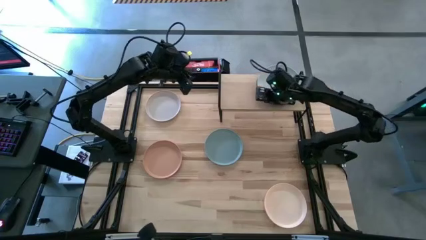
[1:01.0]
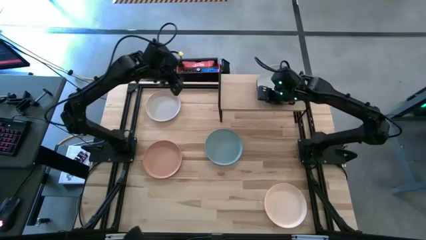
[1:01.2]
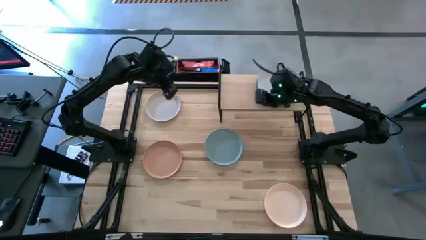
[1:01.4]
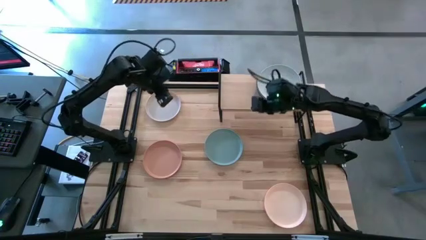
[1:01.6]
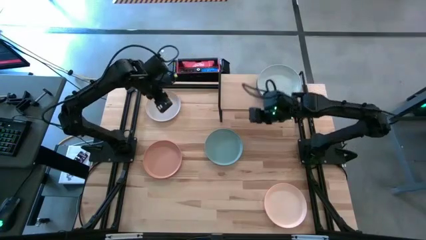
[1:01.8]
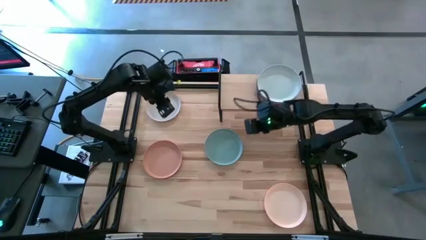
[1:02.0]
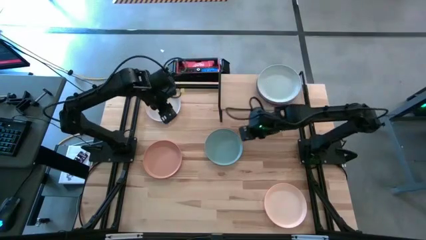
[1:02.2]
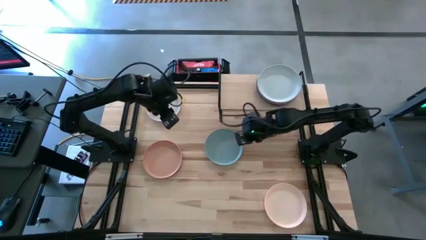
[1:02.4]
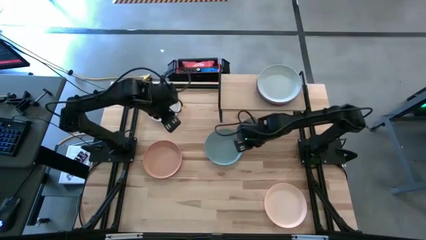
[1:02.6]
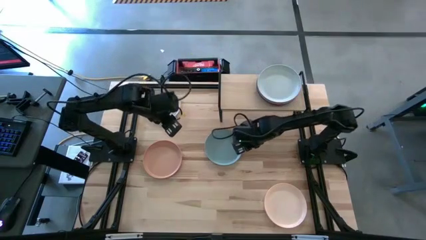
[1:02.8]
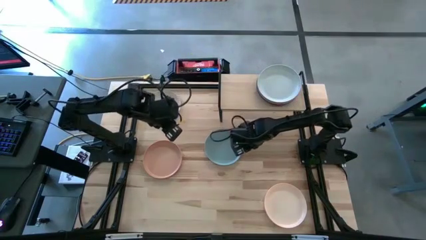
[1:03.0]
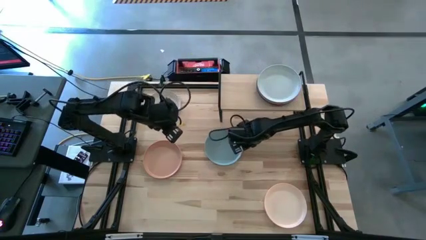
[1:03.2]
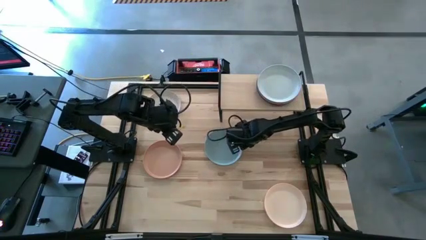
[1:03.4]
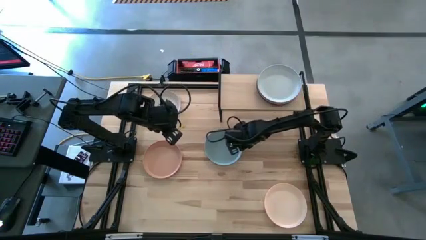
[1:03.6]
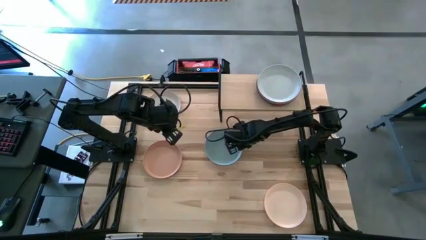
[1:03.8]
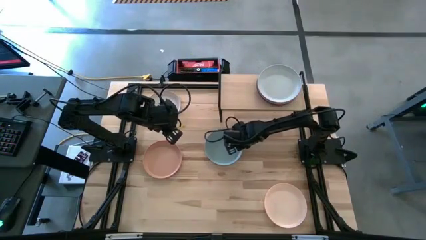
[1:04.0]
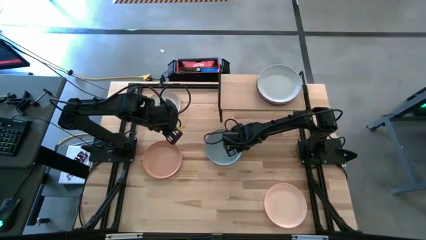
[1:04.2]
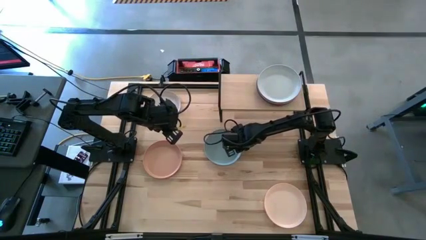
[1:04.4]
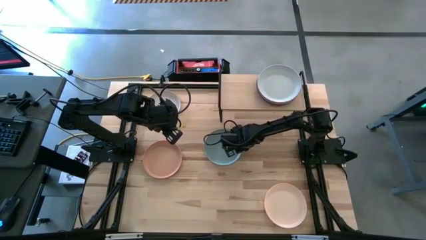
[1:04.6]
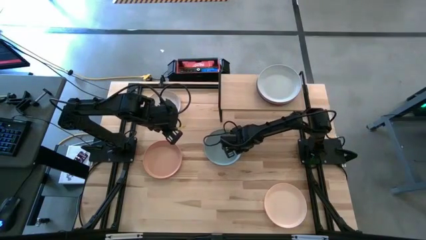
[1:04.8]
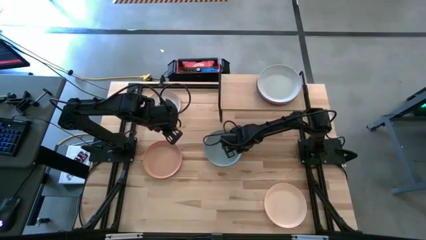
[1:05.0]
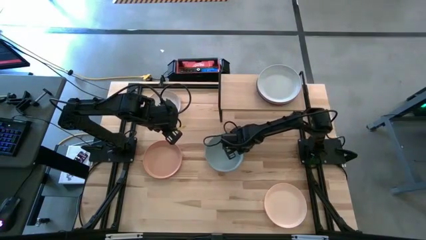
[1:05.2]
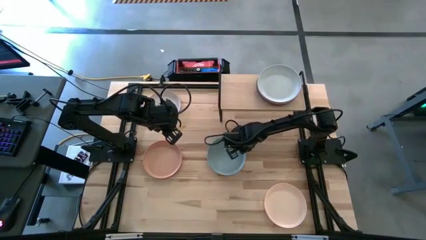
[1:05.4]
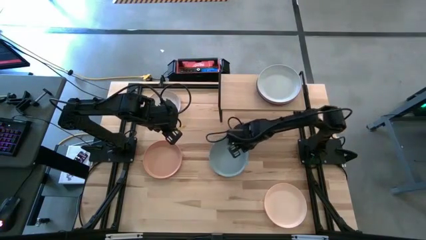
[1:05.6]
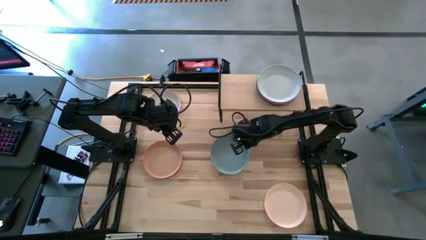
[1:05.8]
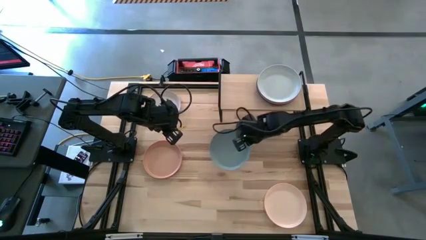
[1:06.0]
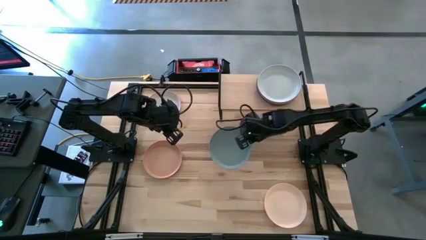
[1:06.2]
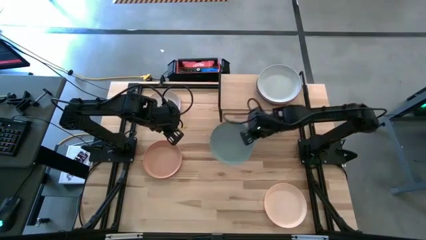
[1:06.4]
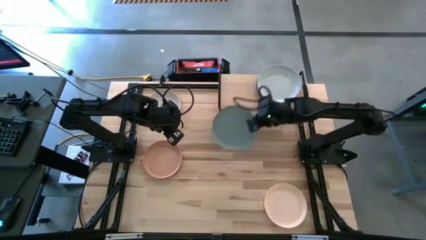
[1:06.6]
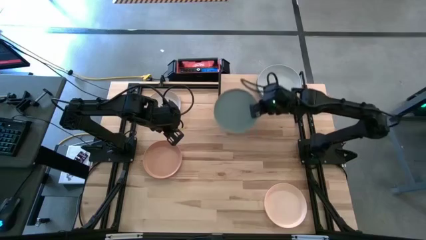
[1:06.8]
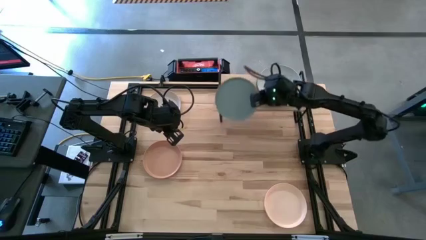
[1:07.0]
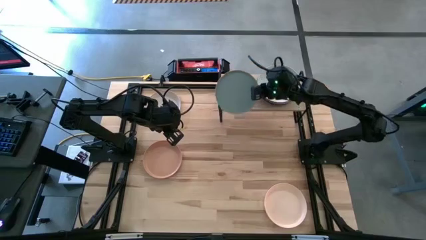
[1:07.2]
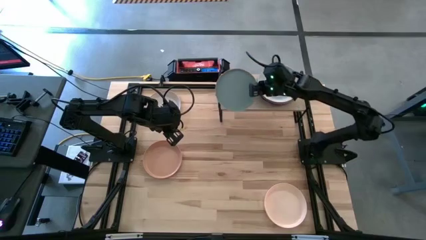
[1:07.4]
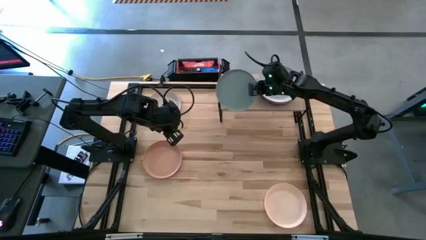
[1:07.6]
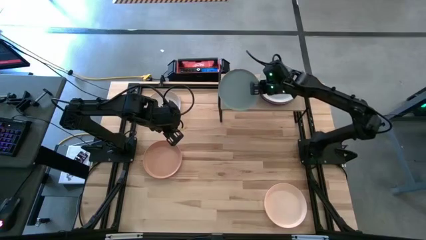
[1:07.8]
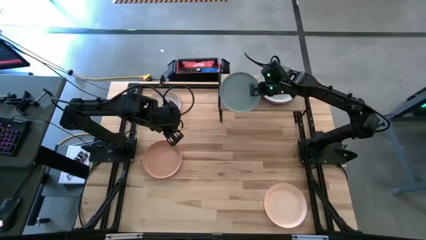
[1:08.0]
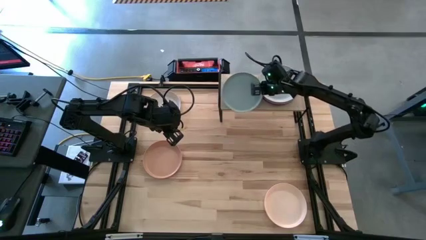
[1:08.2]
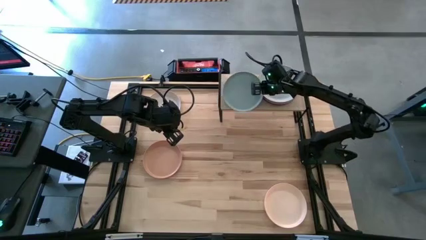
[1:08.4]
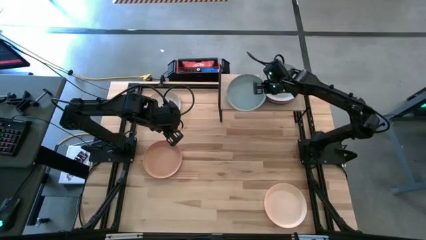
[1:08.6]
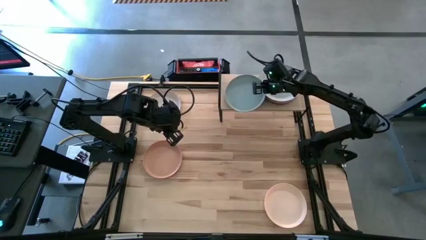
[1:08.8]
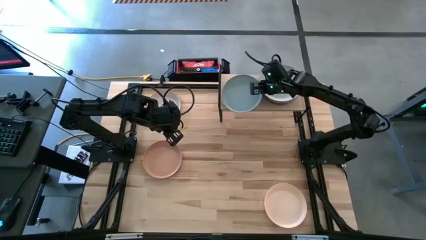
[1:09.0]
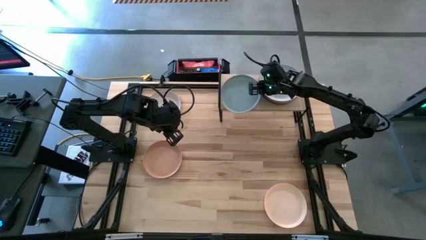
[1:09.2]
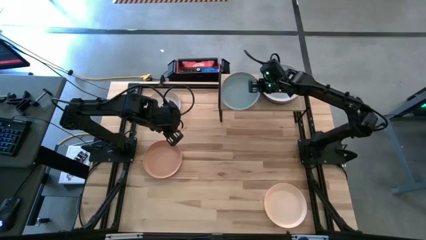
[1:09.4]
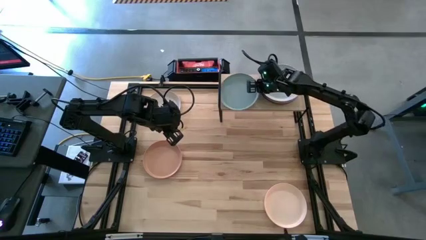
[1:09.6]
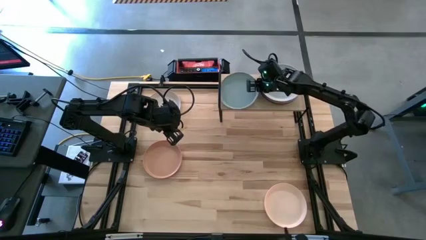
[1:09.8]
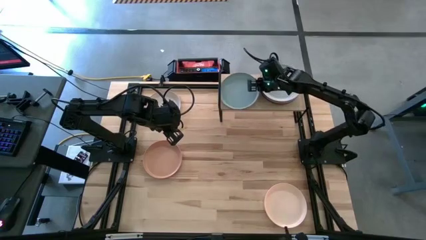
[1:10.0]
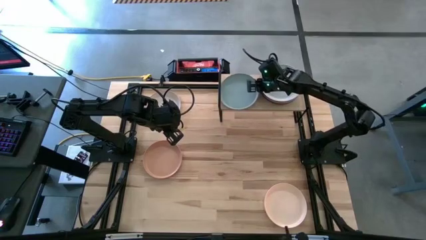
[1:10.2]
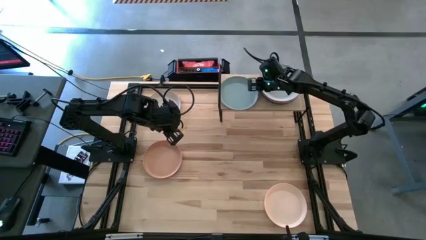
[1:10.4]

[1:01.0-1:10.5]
Task: Place and stack plates onto a shelf
Put the light blue plate on the shelf

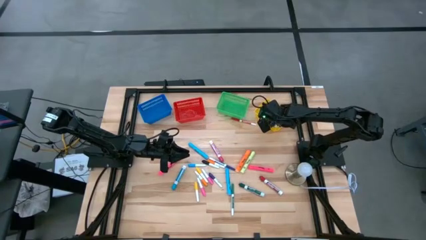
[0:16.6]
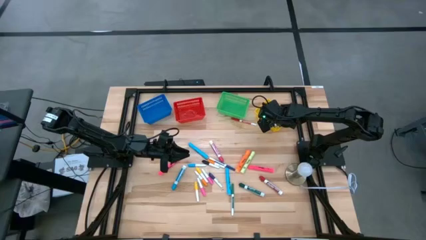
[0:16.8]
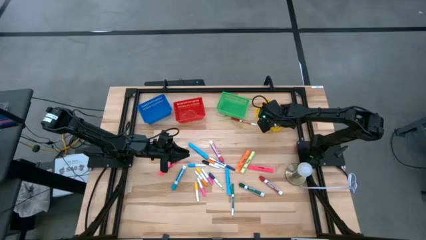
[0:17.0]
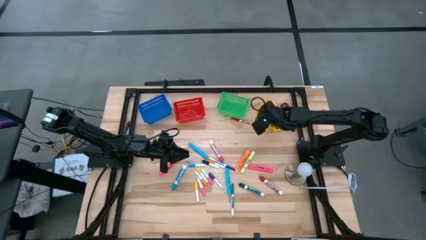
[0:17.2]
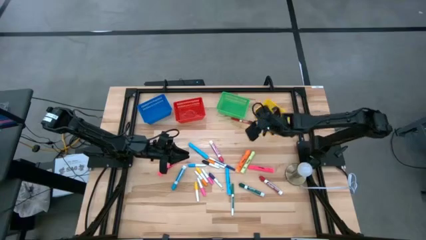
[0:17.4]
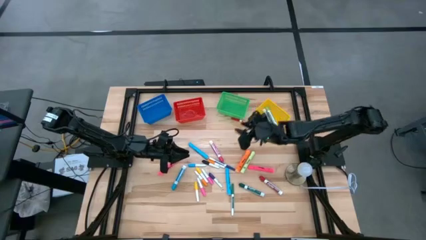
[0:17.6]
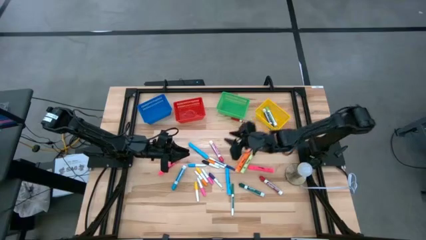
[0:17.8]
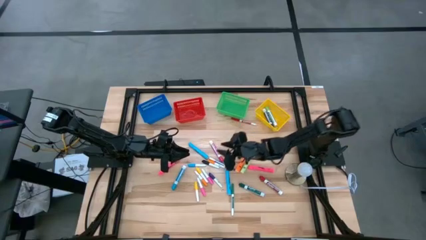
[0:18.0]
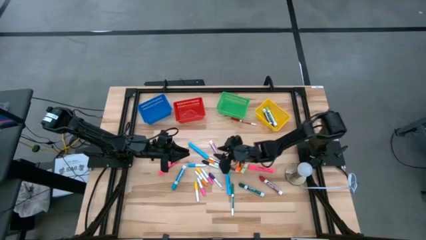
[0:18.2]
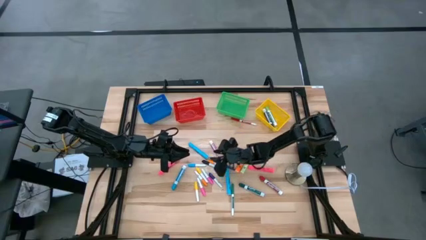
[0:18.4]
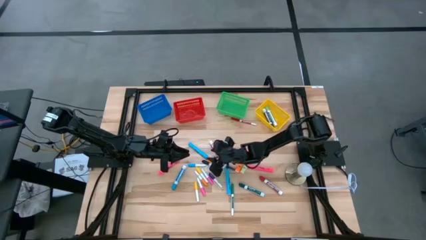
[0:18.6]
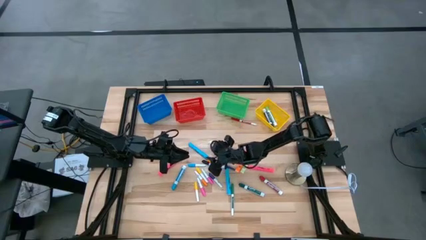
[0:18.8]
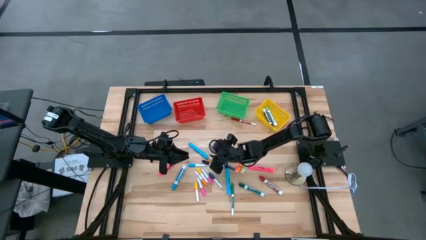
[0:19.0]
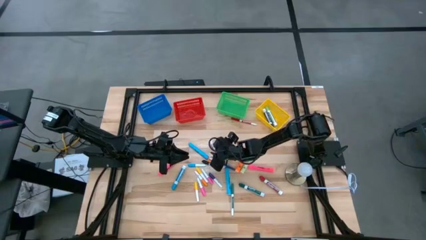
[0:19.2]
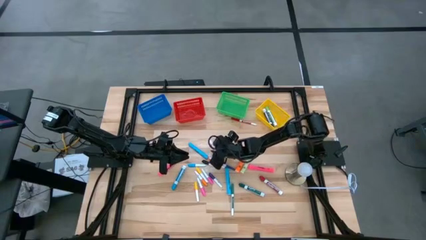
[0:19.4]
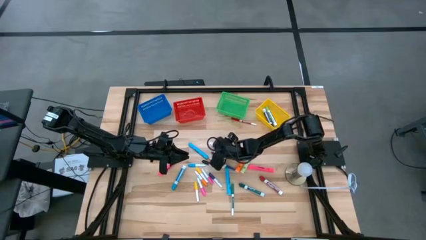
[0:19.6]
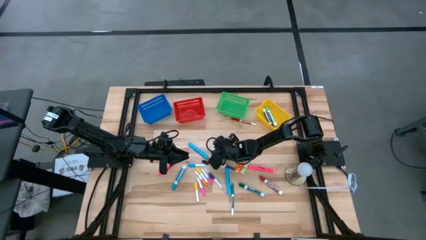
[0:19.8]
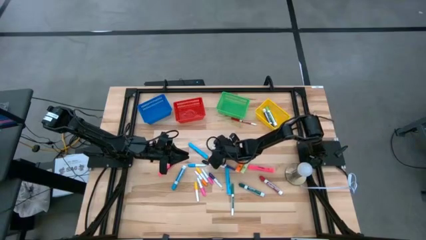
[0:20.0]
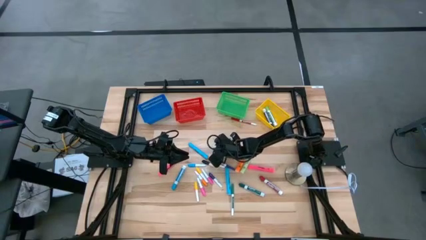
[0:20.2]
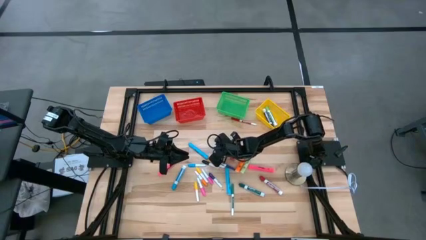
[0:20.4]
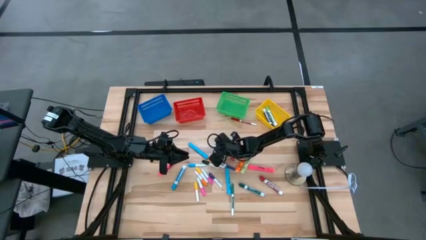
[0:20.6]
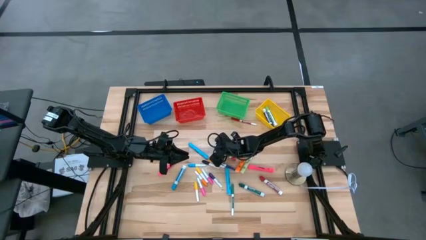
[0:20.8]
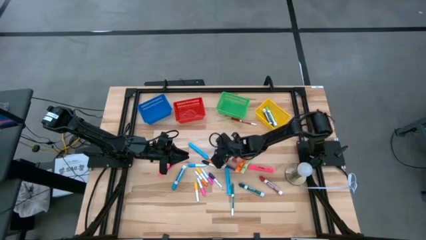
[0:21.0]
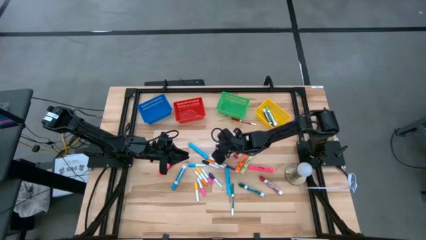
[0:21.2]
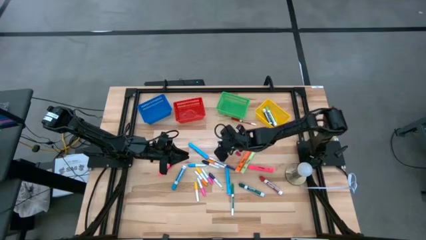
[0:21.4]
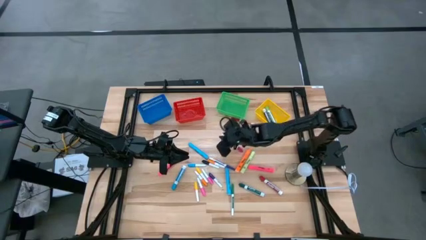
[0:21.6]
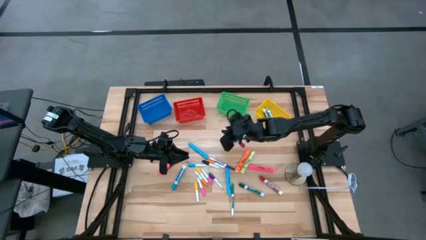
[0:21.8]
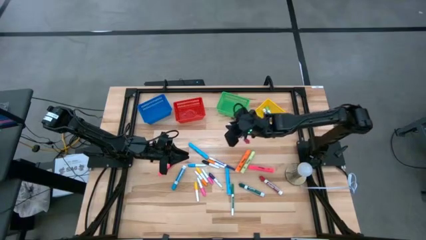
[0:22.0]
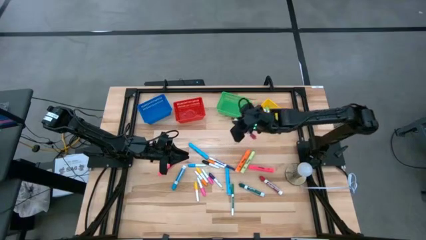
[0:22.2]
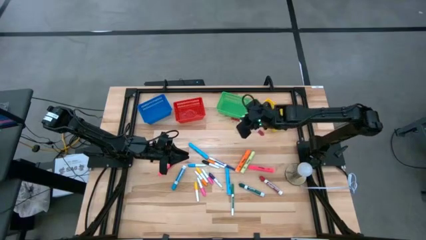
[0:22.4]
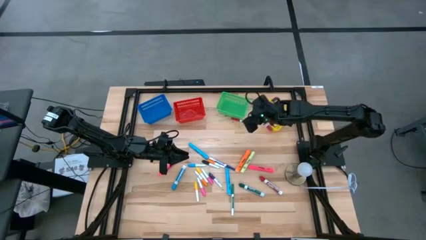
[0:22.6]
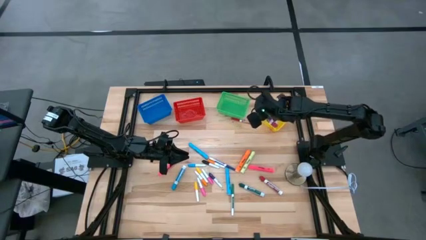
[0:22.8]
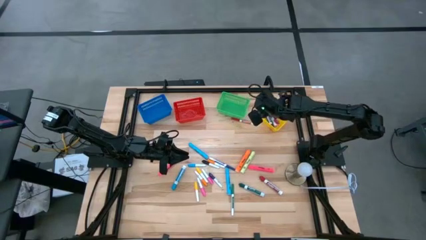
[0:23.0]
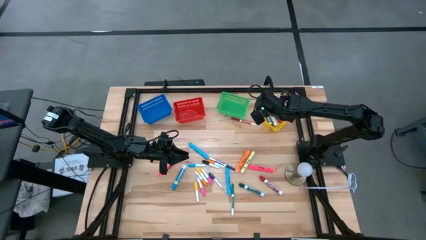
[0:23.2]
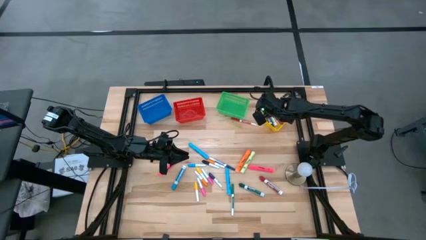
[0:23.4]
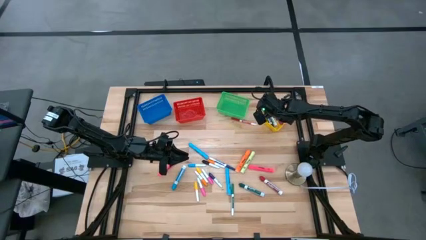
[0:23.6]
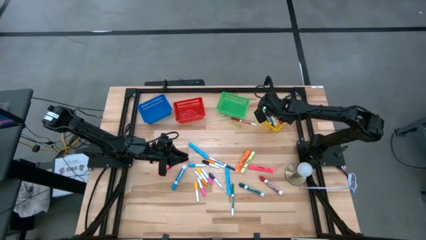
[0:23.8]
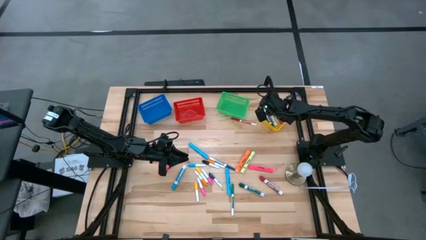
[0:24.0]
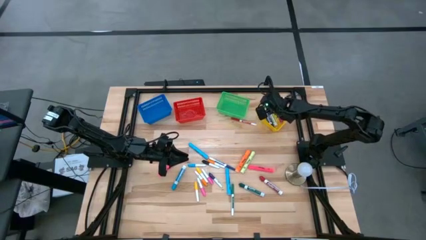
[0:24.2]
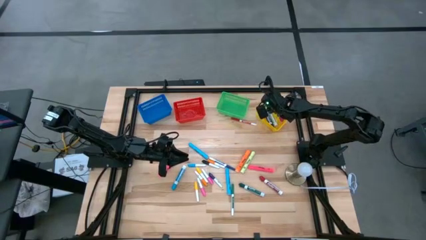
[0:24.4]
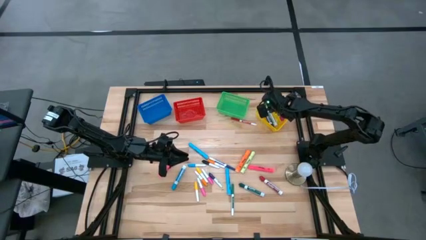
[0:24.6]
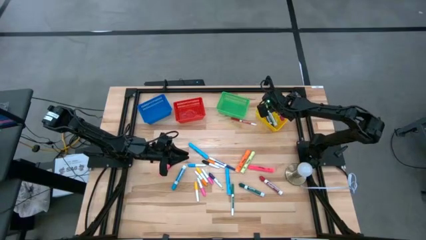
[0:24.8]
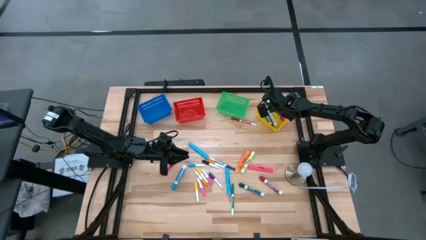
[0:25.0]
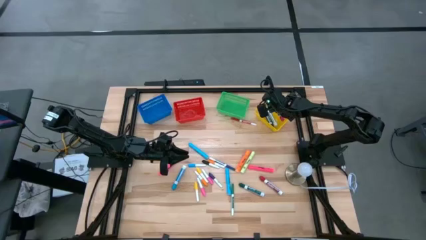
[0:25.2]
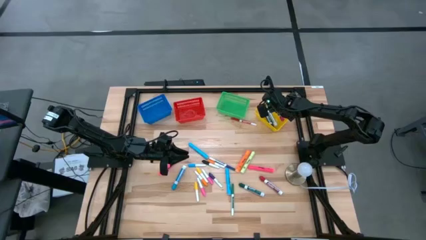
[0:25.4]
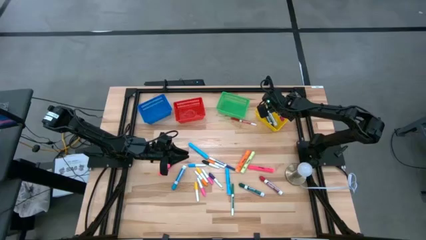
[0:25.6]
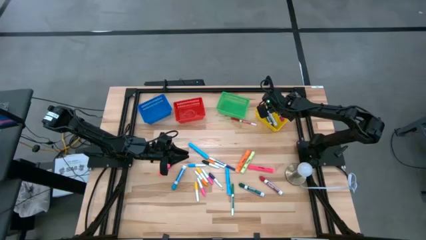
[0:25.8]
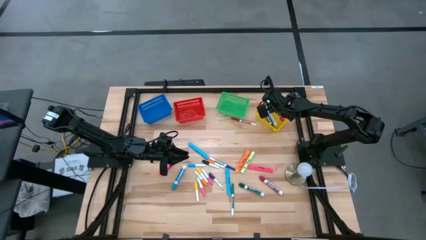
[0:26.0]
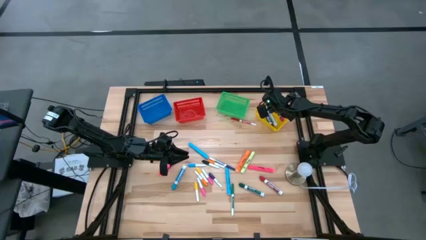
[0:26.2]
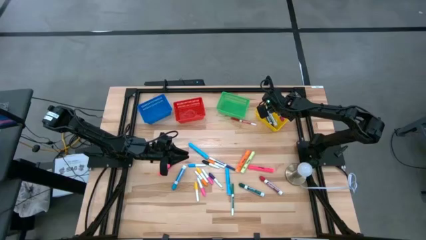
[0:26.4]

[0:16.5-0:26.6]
Task: Pick & Place Markers
Put the large pink marker pen into the yellow bin
